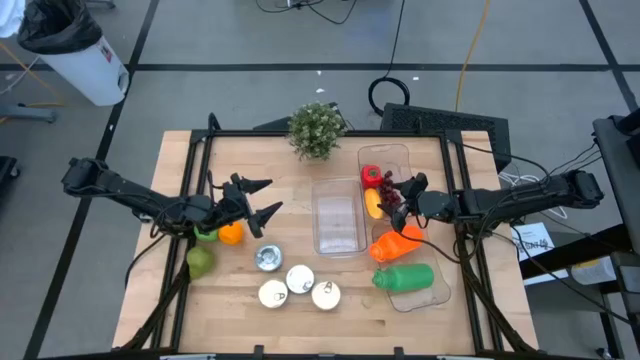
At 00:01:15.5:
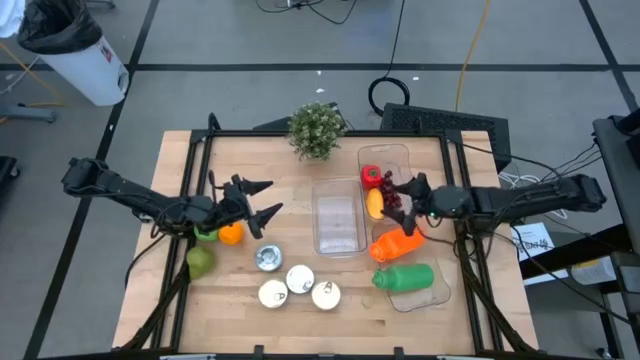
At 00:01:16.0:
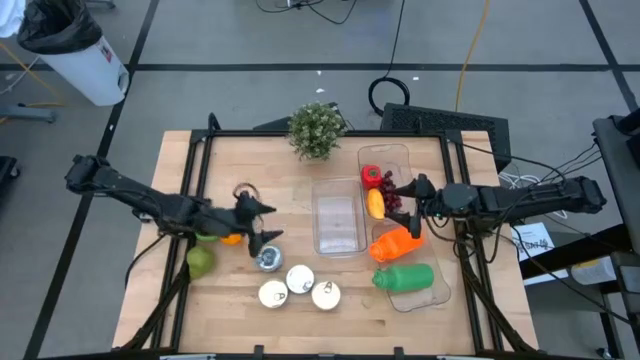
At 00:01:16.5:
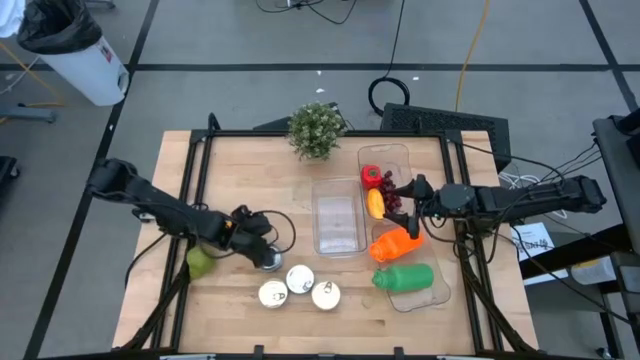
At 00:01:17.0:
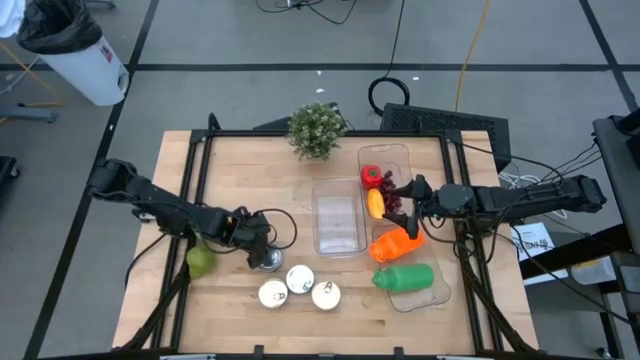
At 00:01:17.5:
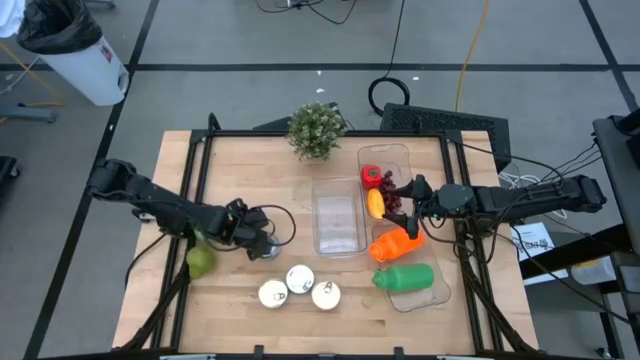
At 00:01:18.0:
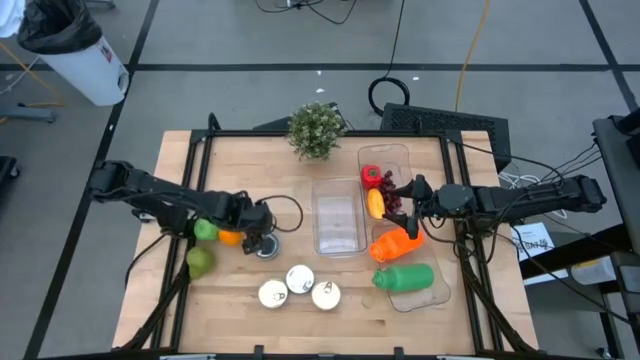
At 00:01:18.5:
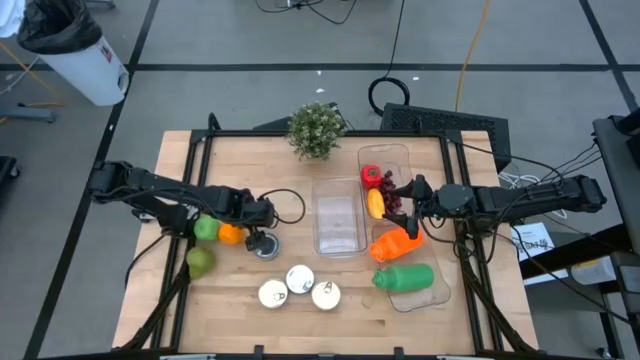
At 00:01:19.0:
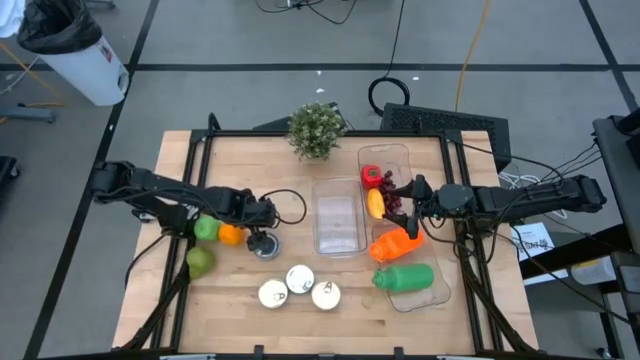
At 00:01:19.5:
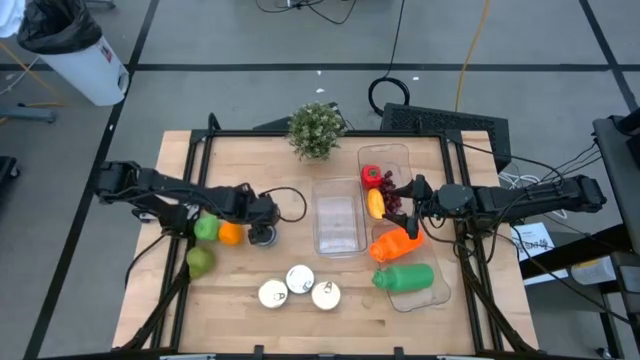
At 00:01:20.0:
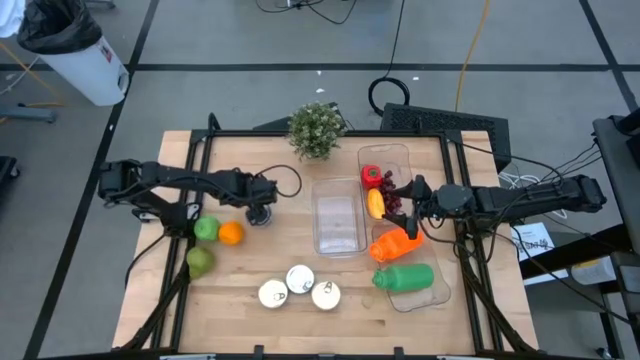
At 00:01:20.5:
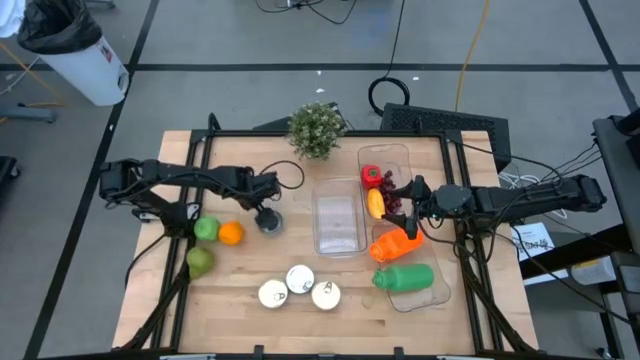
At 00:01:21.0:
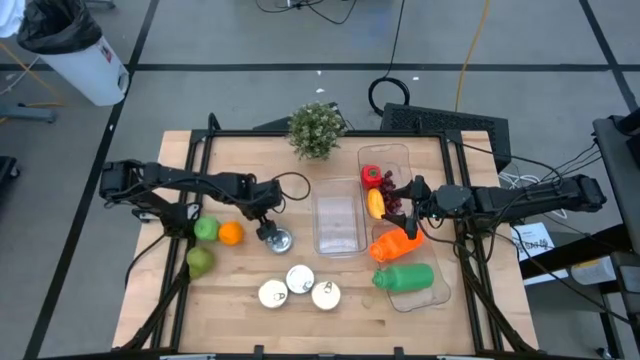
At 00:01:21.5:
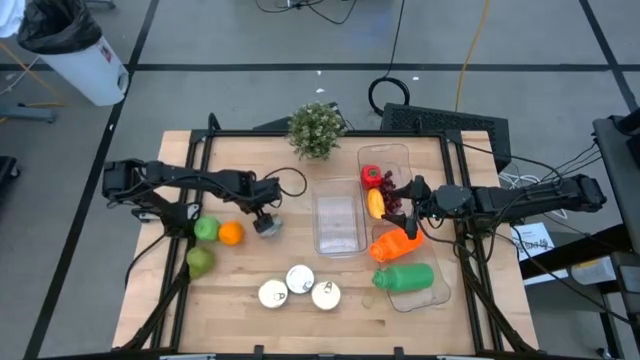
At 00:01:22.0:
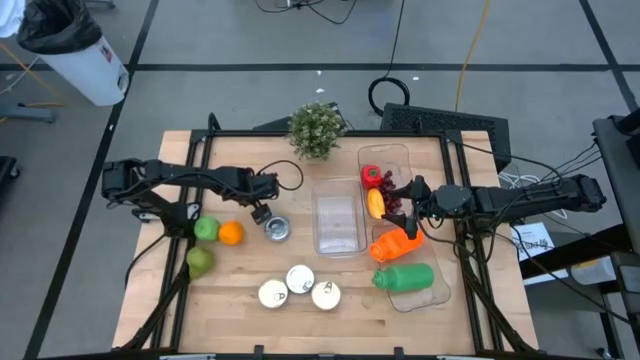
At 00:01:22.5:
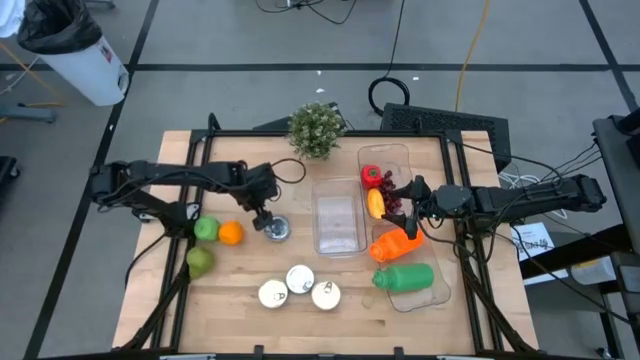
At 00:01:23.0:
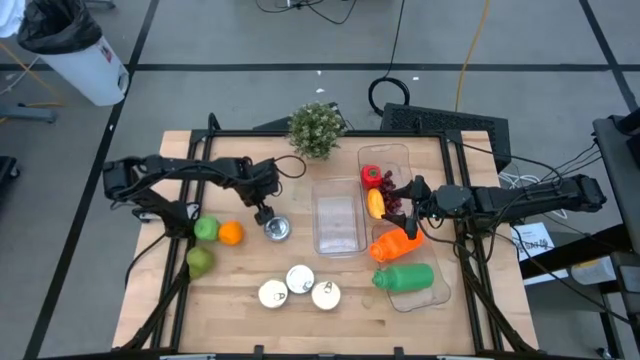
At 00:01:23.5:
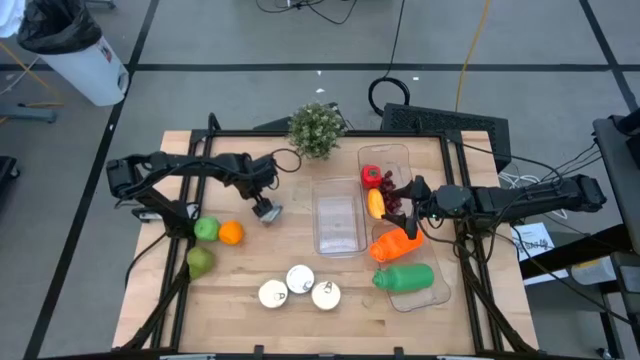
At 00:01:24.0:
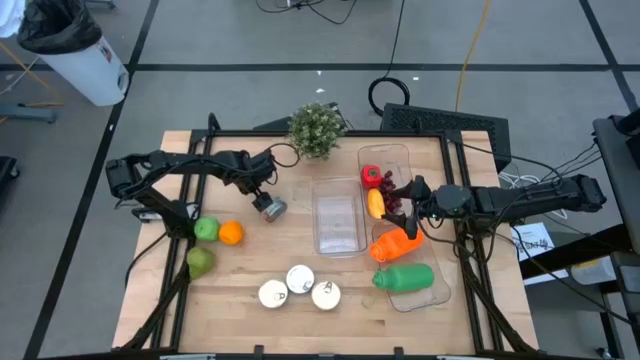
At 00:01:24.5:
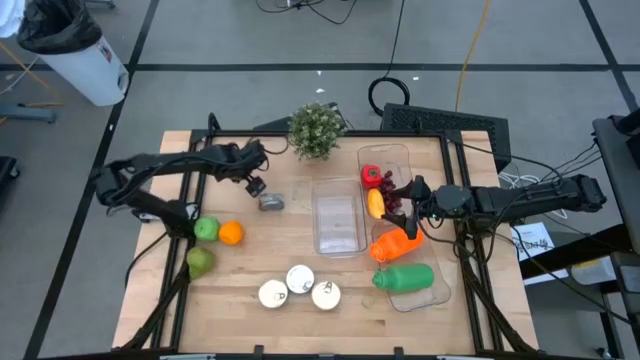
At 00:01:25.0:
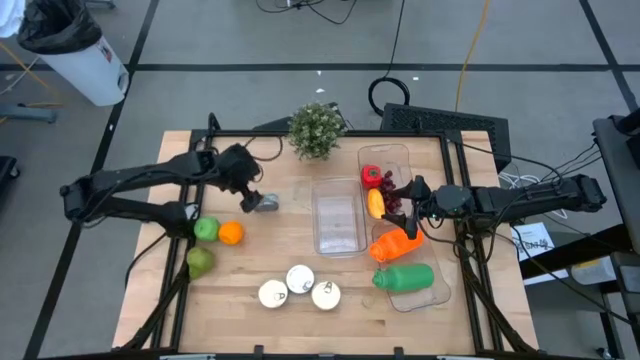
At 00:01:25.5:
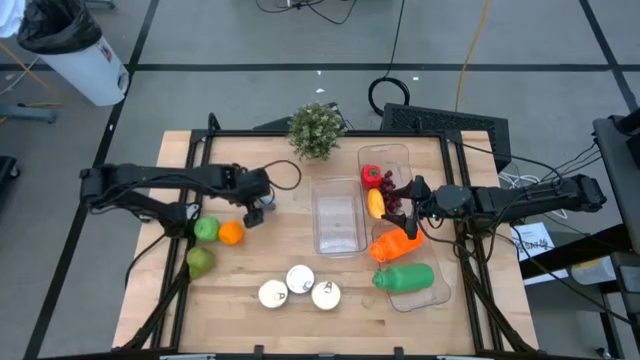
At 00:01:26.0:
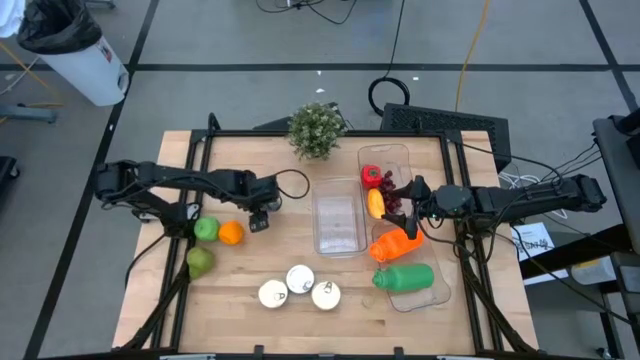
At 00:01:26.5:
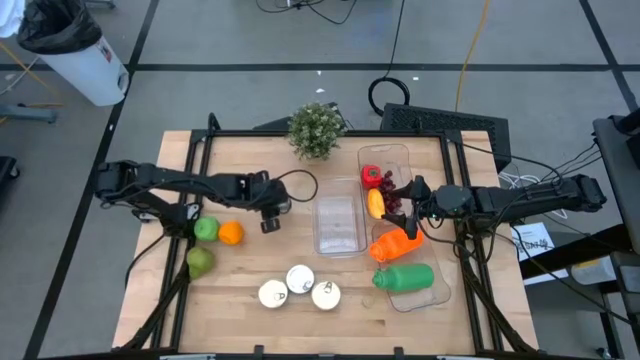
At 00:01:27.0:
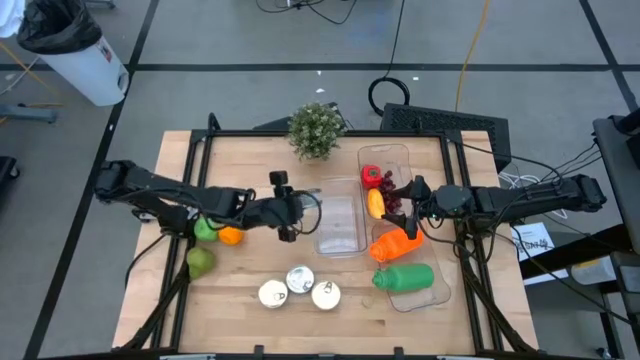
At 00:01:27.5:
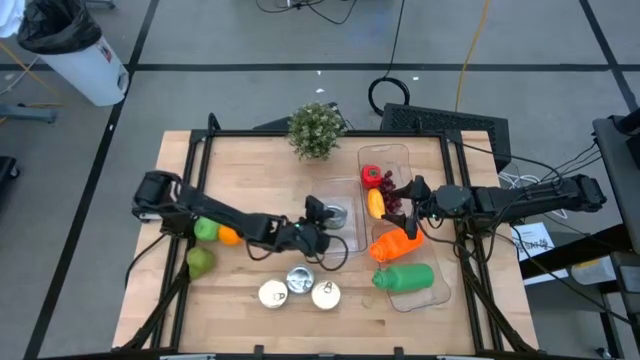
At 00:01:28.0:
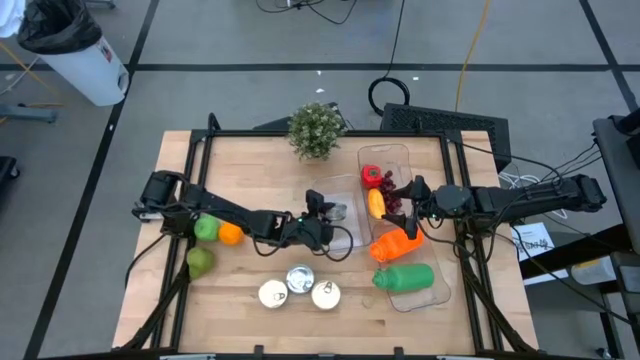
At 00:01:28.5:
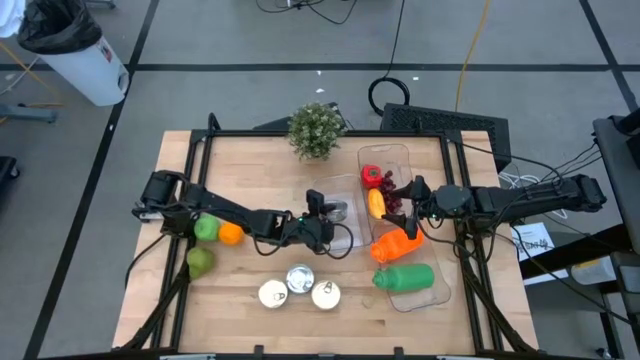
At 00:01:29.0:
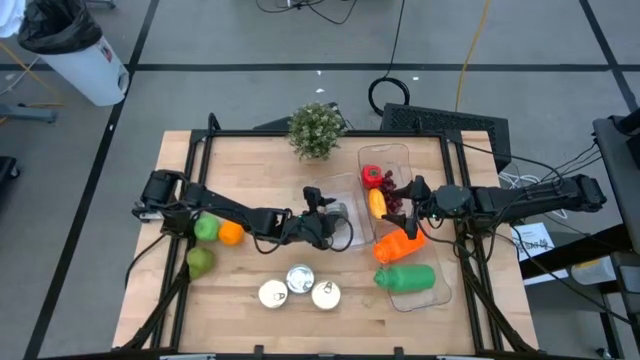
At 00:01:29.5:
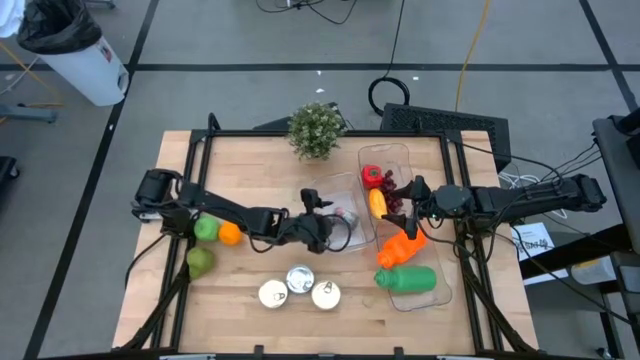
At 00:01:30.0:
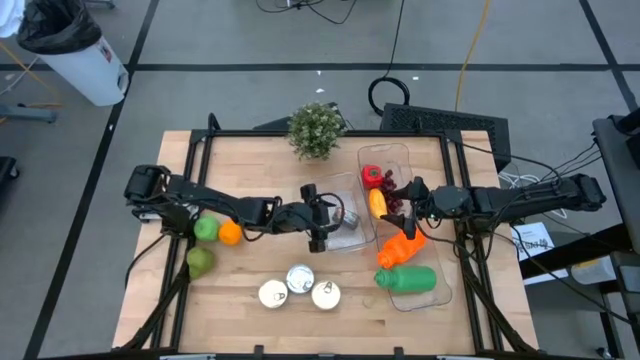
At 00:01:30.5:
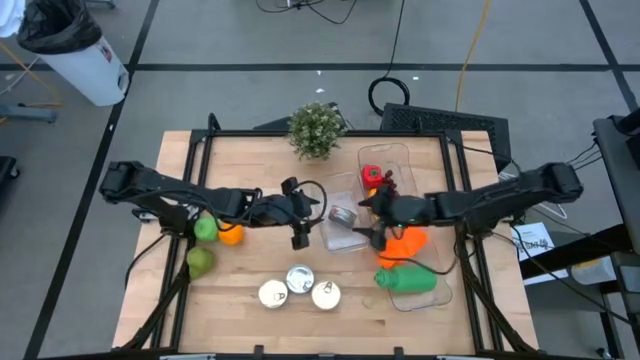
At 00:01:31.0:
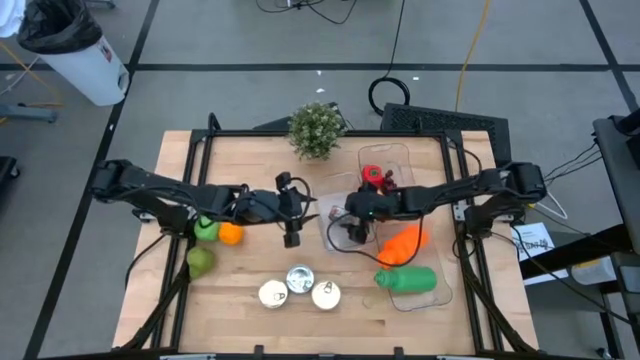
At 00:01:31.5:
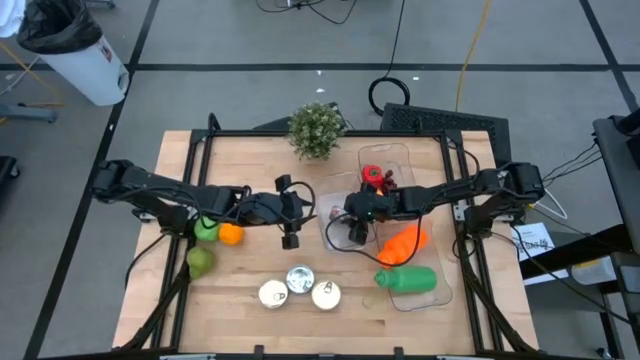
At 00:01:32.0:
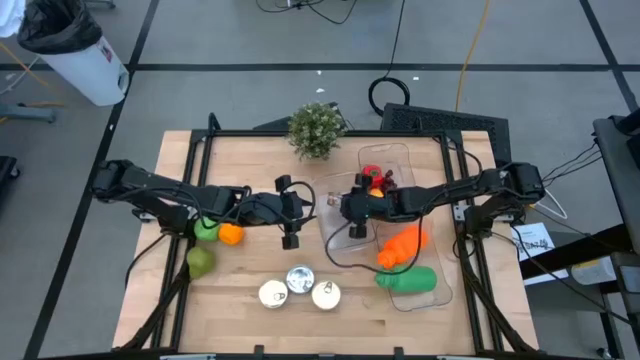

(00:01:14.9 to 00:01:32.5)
Task: Pick & Place Food Item
Put the top green tuna can into the middle transparent bin

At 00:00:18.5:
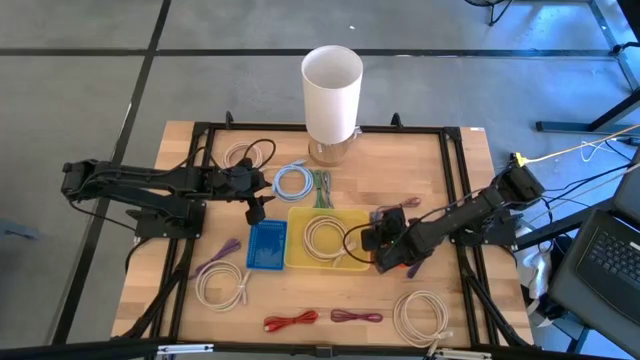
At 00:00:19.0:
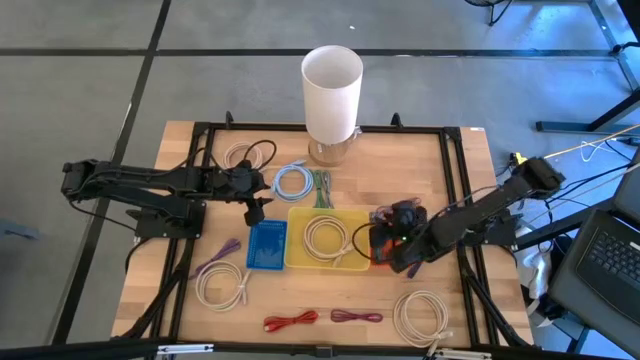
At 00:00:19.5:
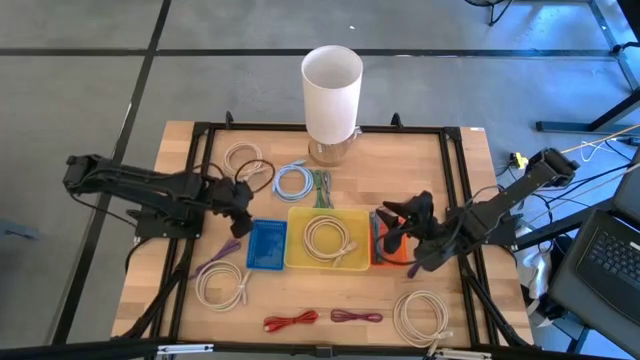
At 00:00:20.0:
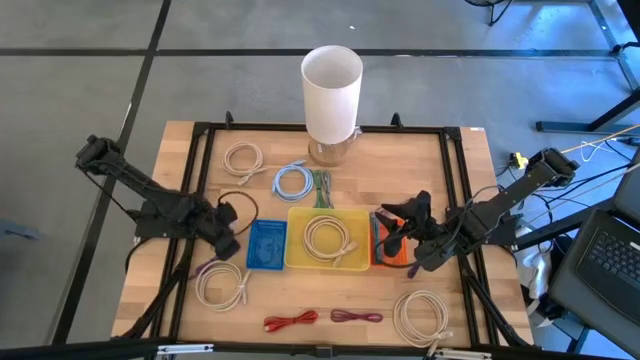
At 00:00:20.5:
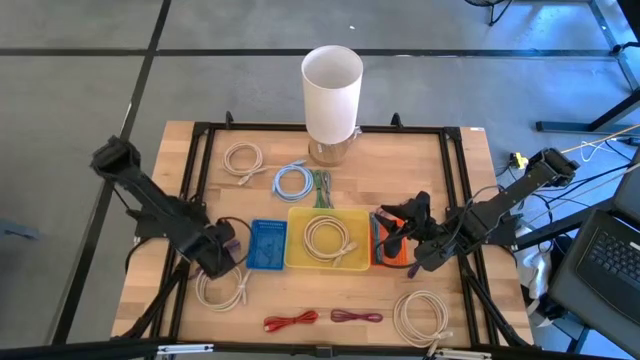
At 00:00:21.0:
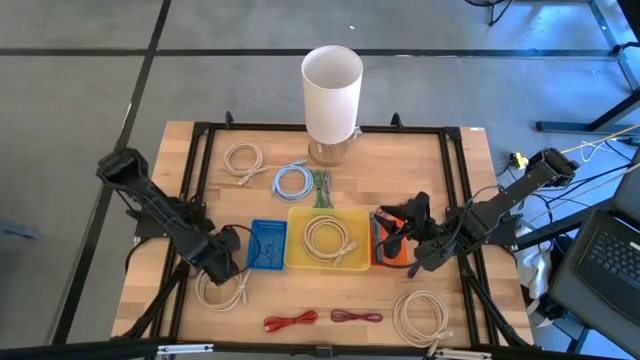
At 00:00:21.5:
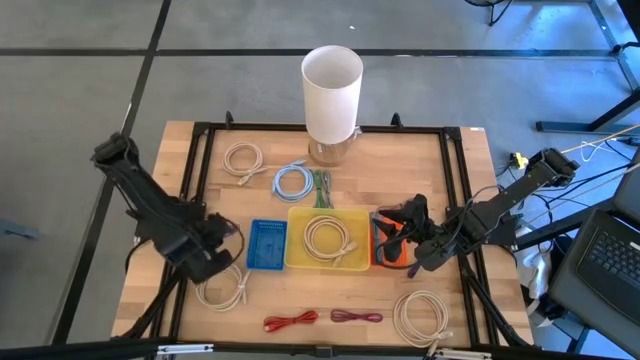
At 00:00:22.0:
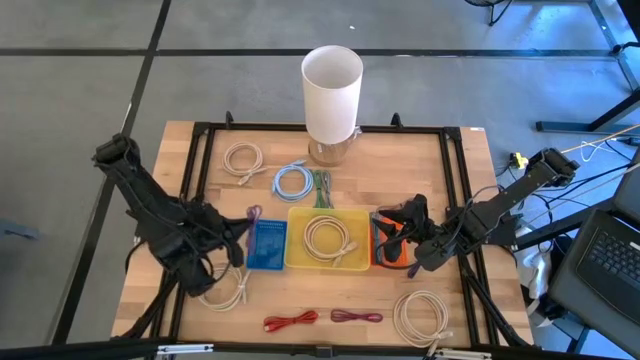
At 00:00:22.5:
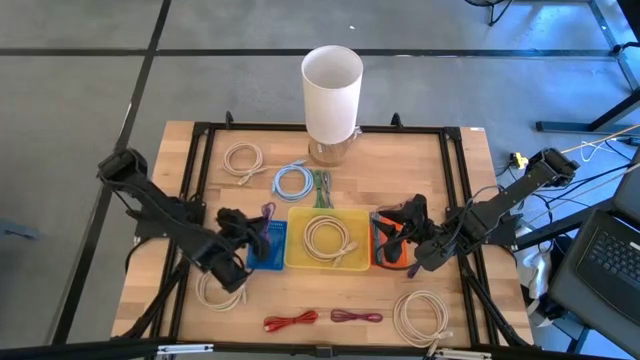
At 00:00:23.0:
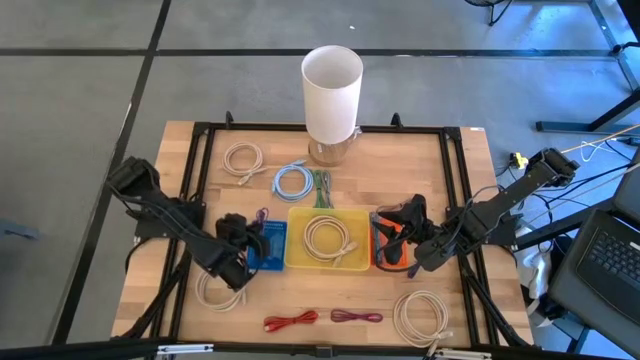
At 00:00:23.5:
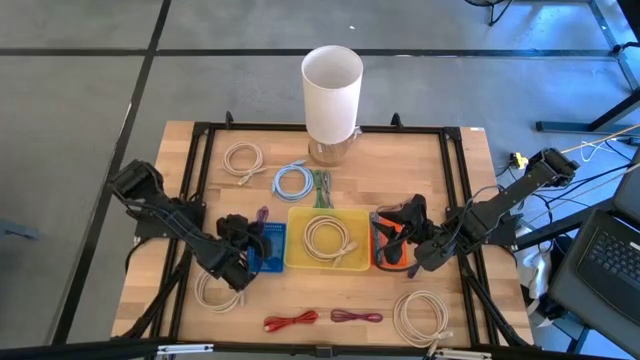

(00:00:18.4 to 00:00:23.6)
Task: Pick & Place USB Port
Put the purple charger cable into the blue bin
